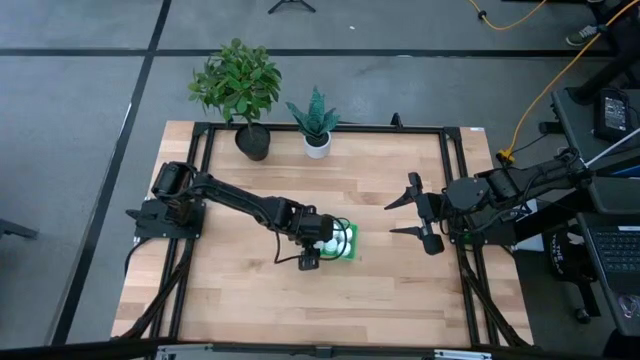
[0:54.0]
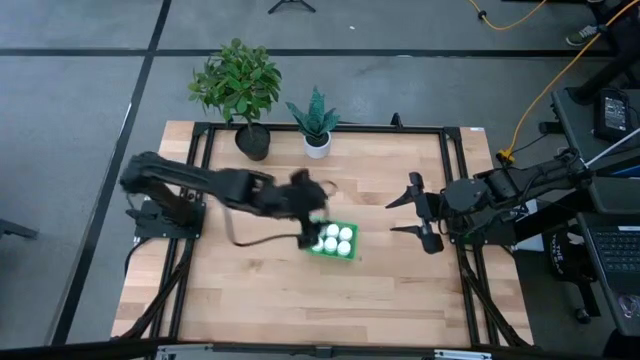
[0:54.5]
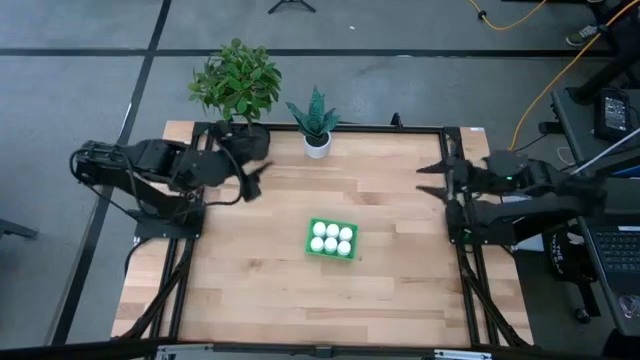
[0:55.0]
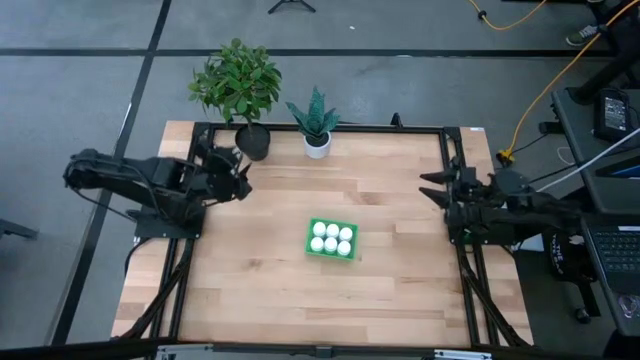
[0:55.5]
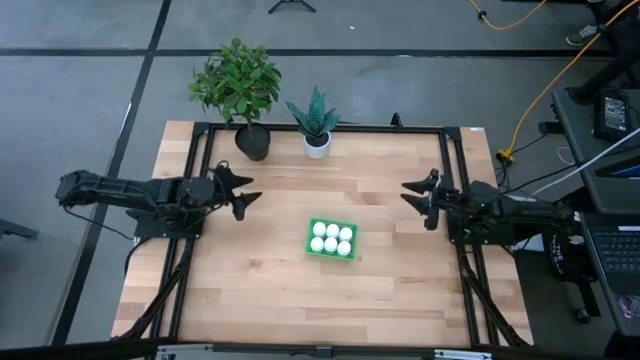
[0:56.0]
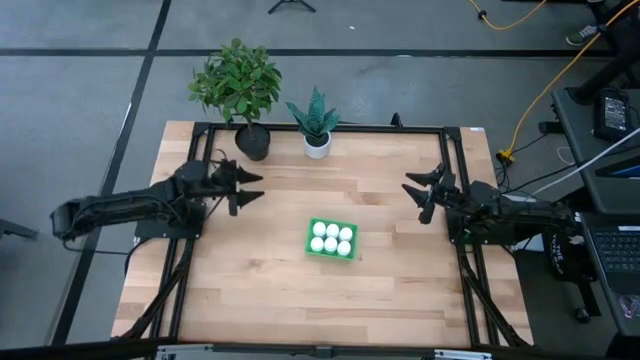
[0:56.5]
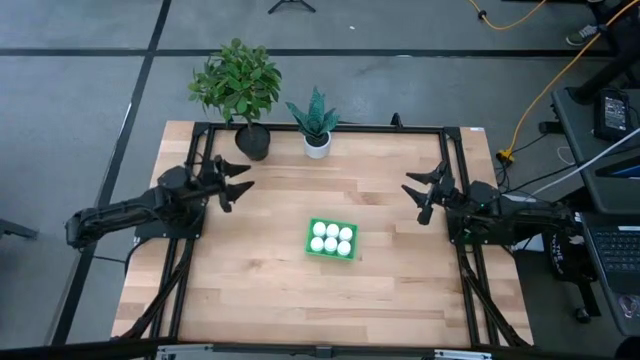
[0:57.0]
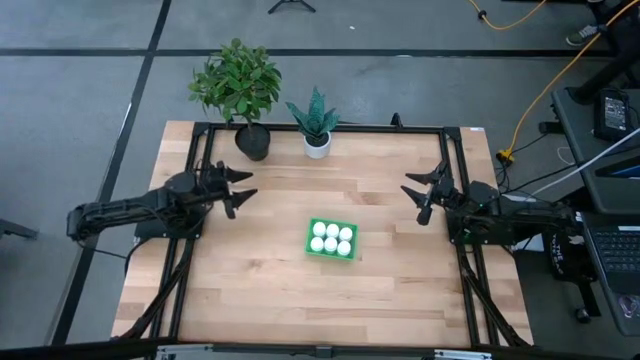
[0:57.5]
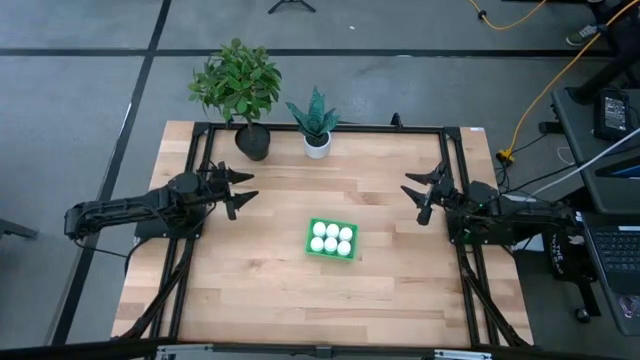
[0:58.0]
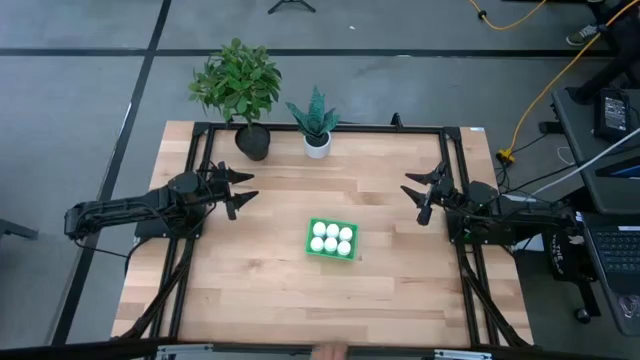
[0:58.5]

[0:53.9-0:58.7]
Task: Pick and place pill bottles into a basket
Return to Home Position

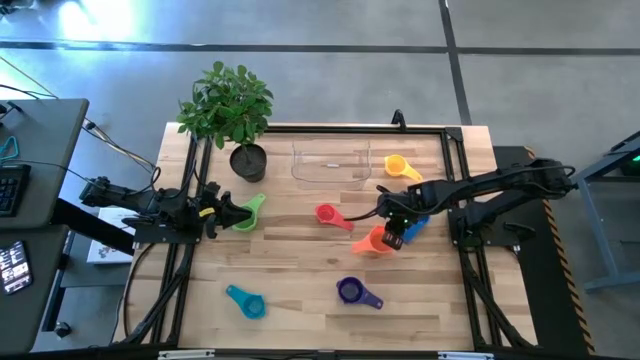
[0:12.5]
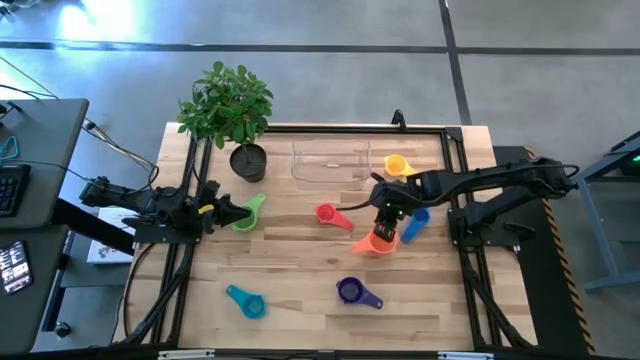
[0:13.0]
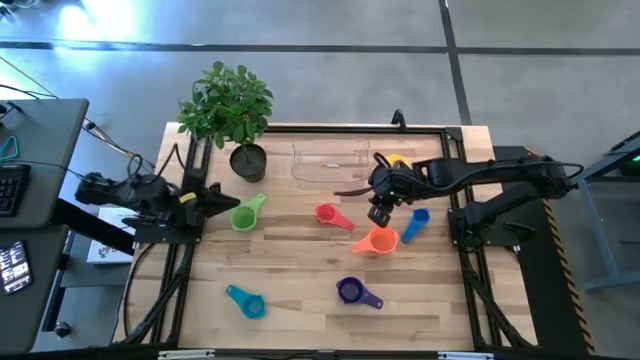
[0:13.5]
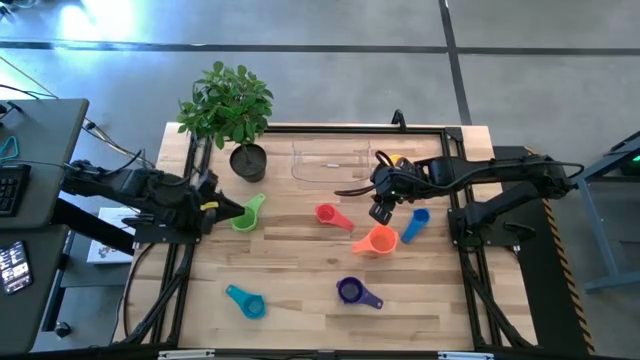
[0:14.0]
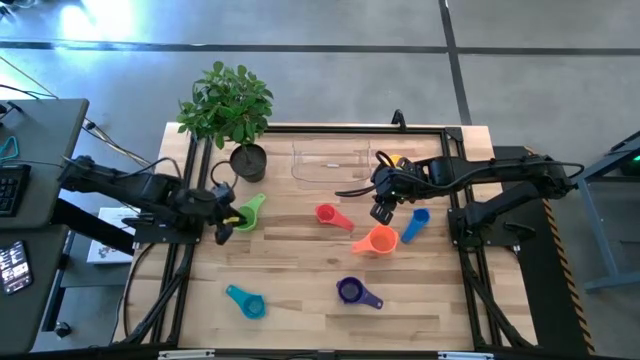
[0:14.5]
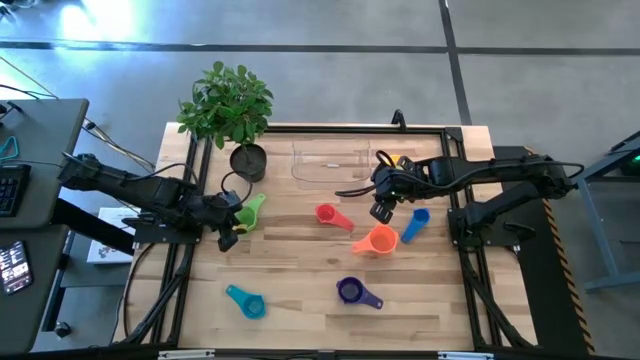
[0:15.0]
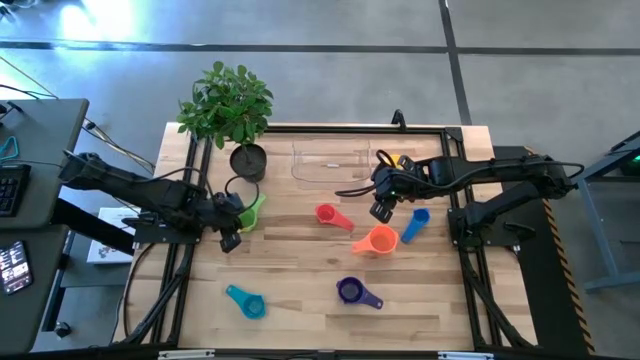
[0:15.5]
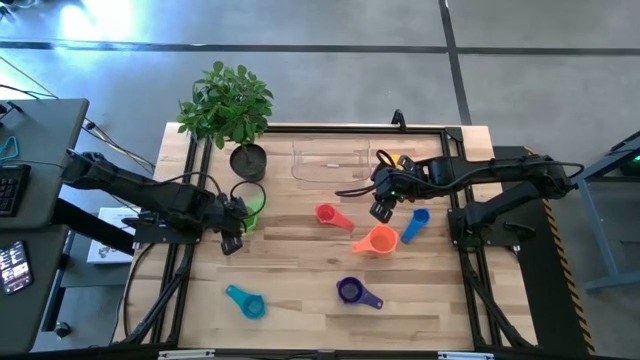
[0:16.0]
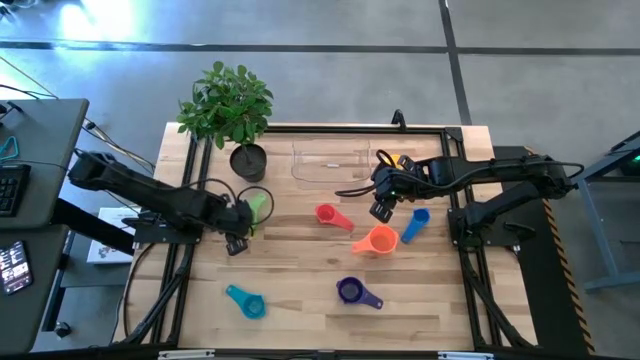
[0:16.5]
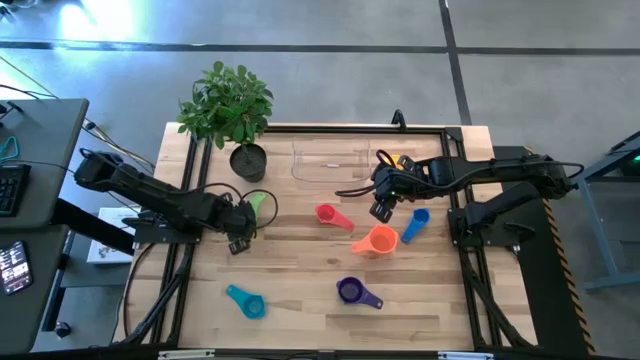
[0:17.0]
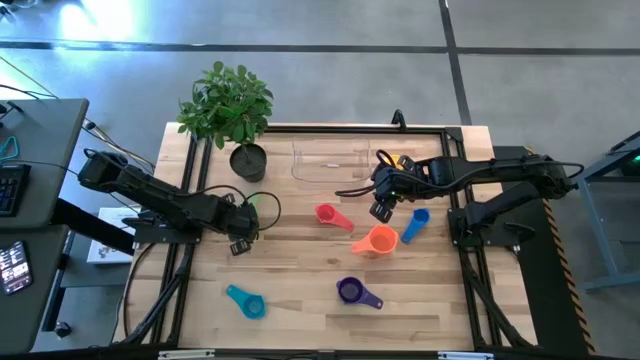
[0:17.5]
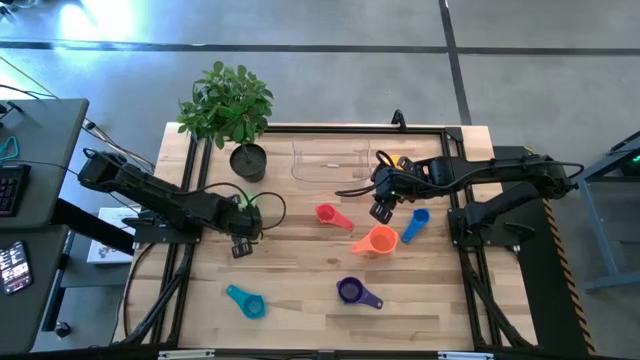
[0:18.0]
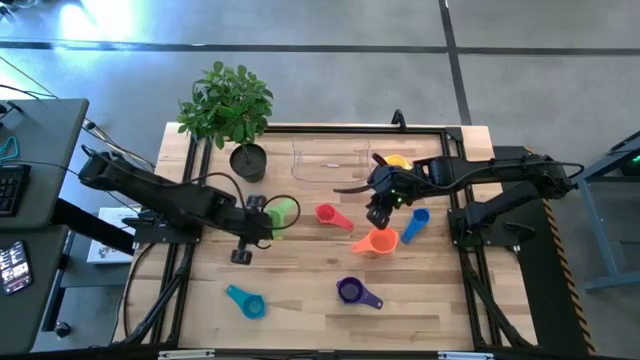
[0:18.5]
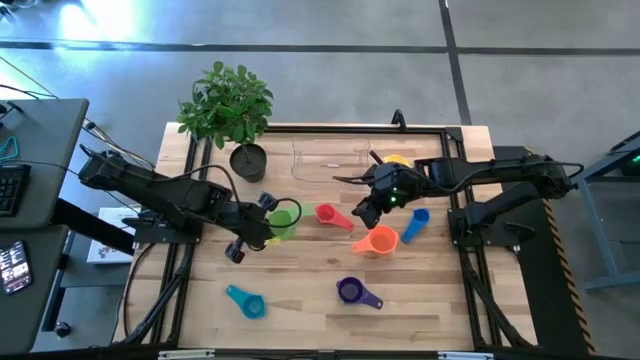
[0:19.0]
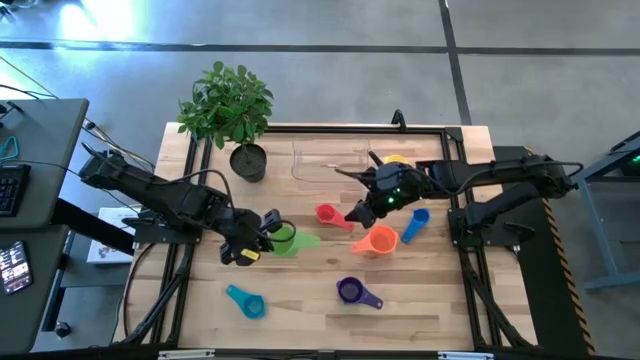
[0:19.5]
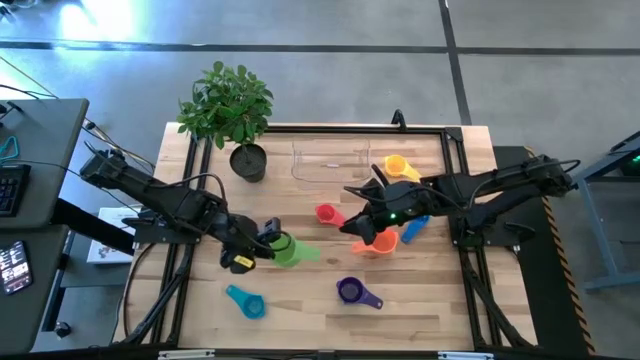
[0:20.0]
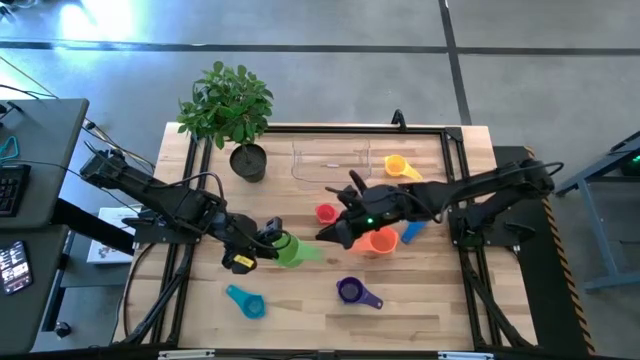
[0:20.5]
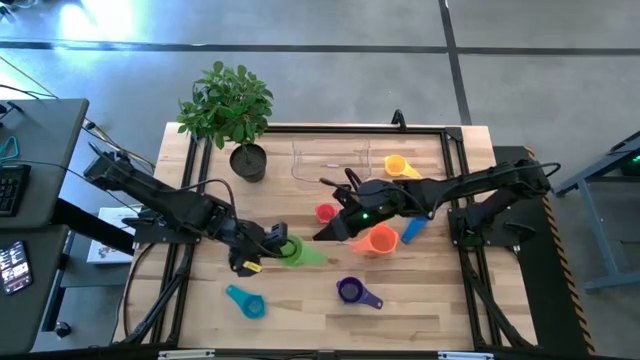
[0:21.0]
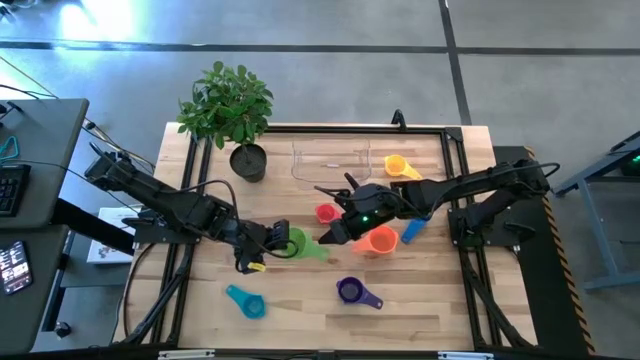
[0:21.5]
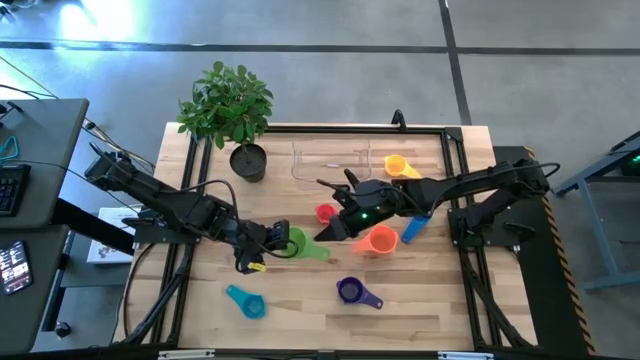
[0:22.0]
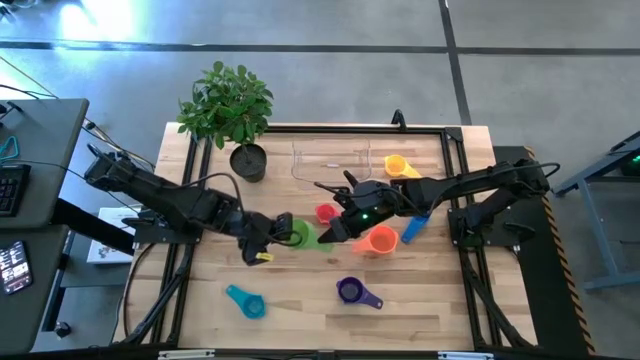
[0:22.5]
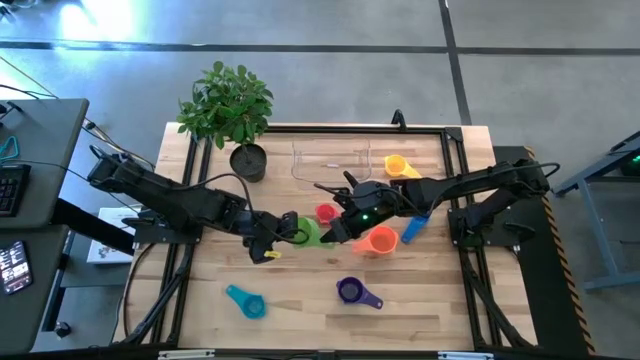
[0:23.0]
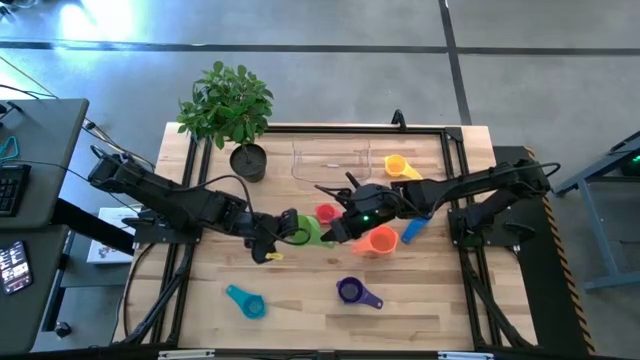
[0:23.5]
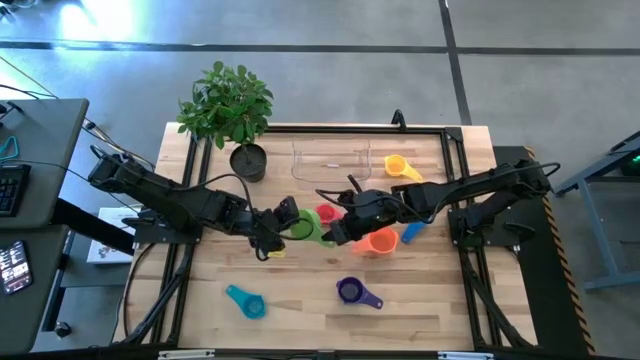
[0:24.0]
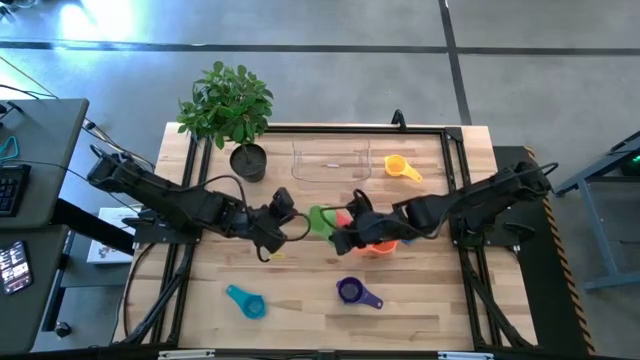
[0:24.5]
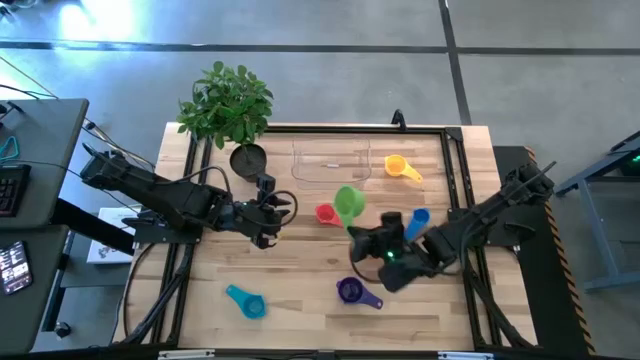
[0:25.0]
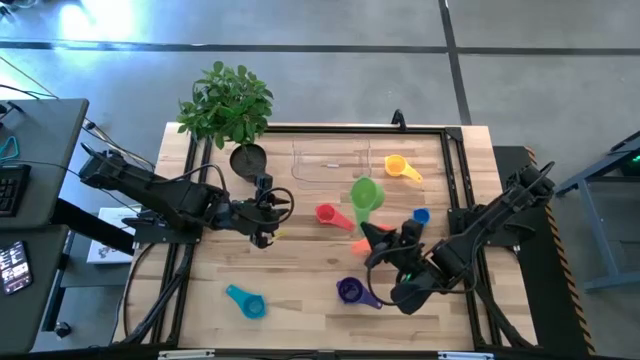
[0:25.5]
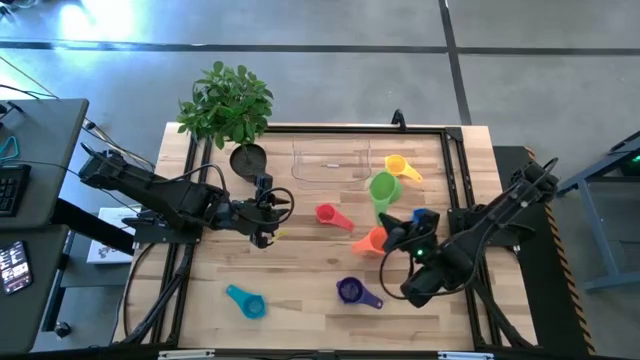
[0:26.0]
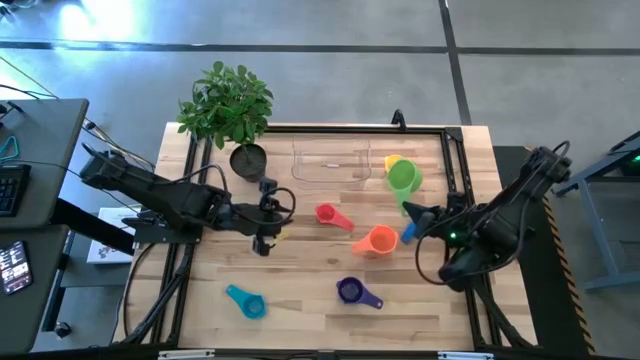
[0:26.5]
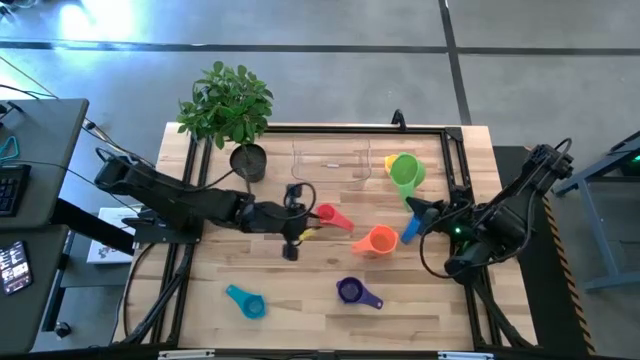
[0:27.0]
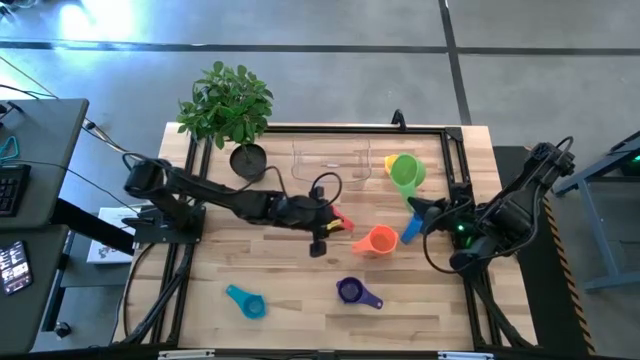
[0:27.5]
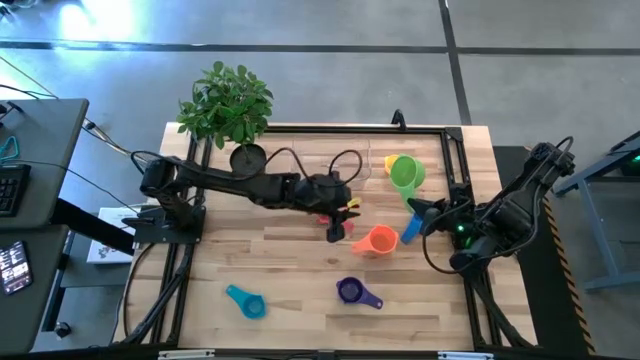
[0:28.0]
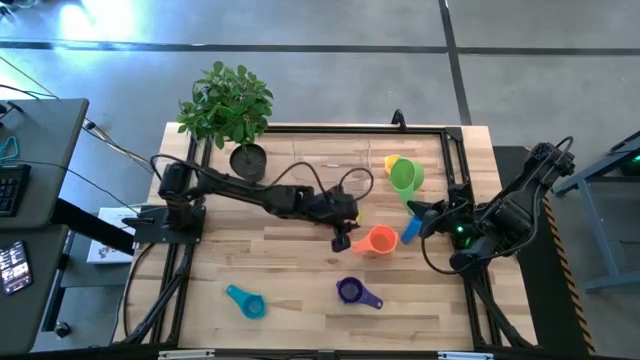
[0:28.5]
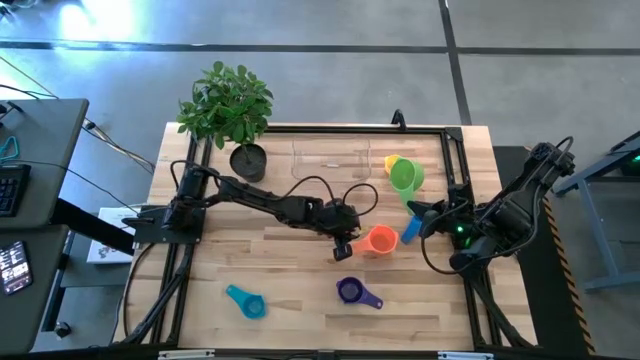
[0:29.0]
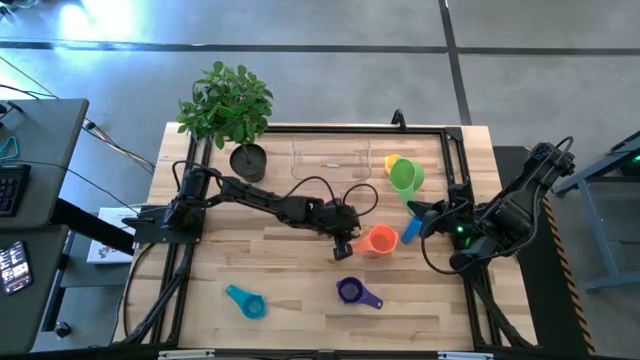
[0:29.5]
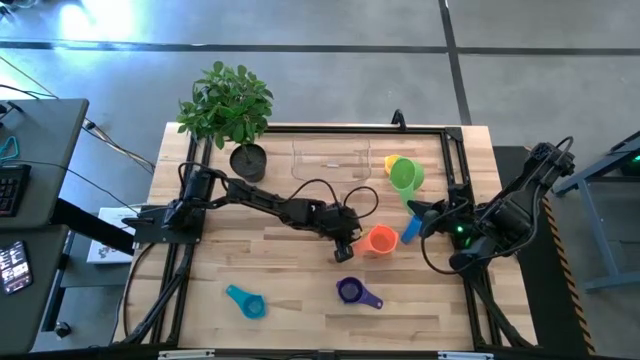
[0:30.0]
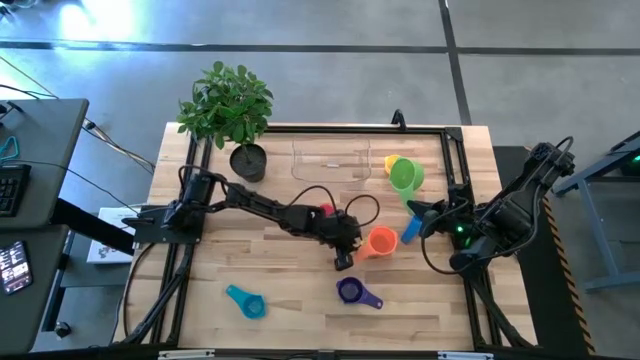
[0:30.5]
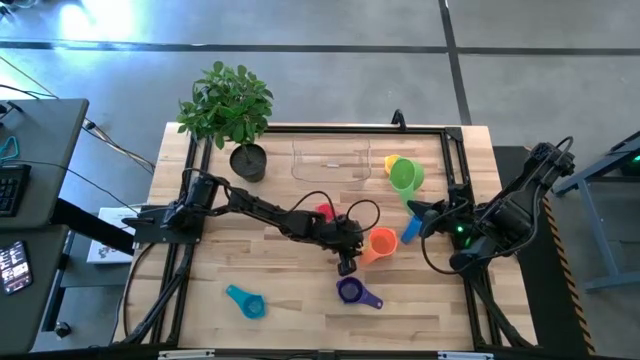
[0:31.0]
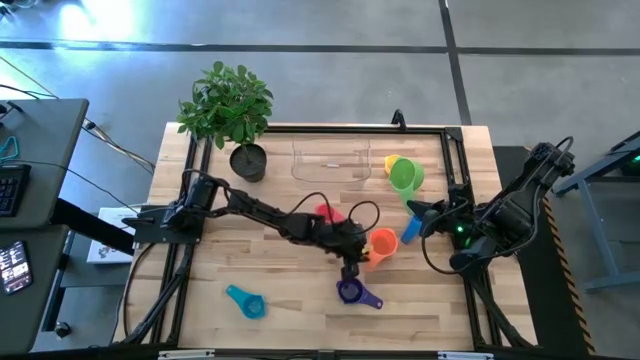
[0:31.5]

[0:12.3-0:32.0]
Task: Nest measuring cups in basket
Stack the green measuring cup on top of the orange measuring cup
